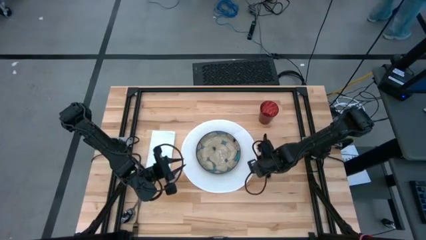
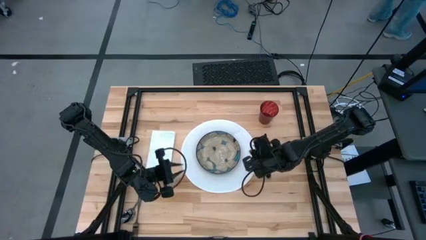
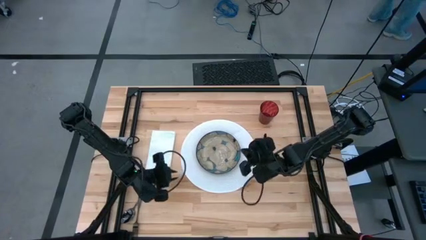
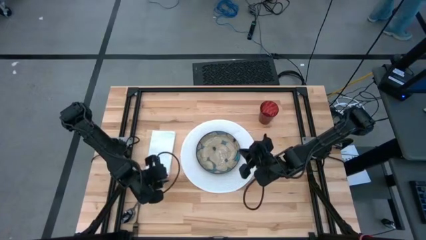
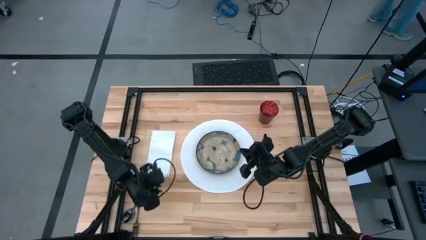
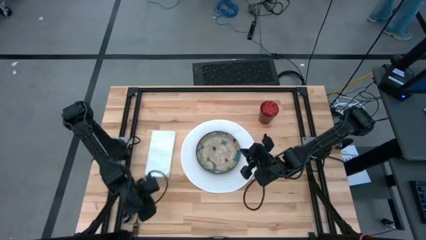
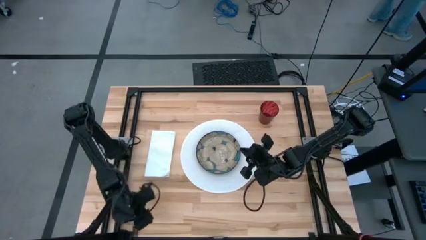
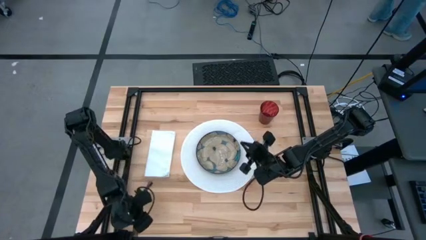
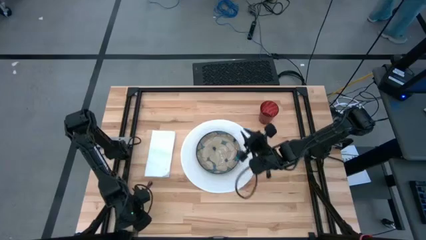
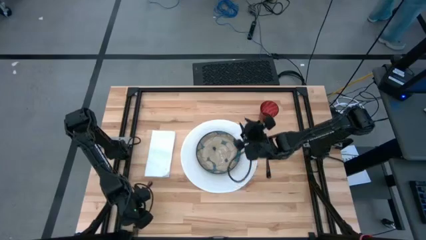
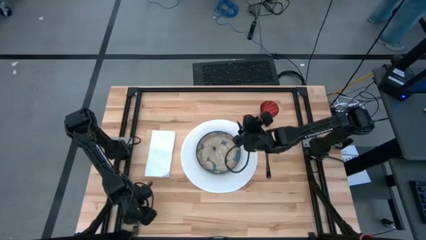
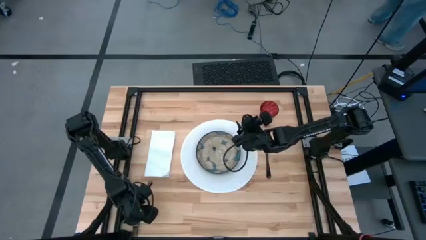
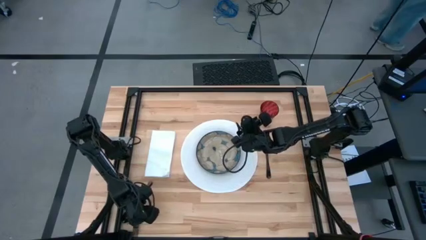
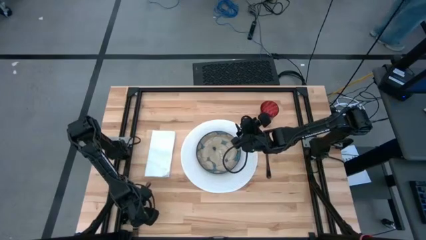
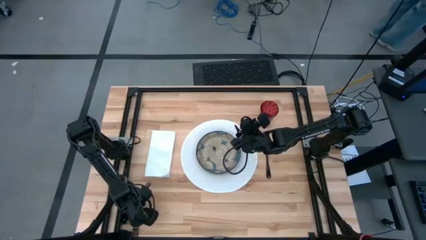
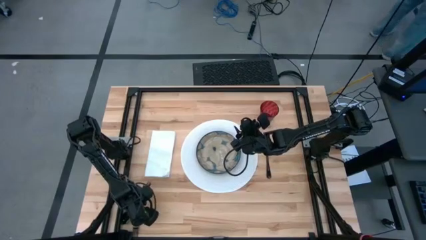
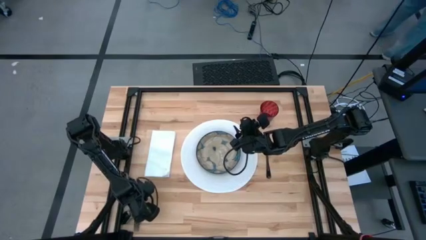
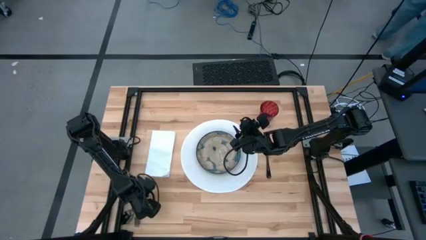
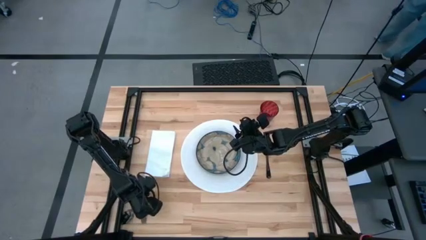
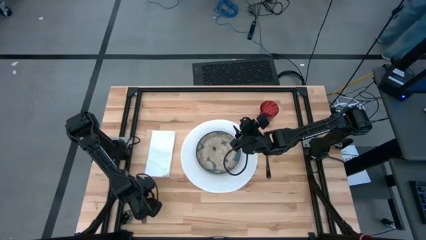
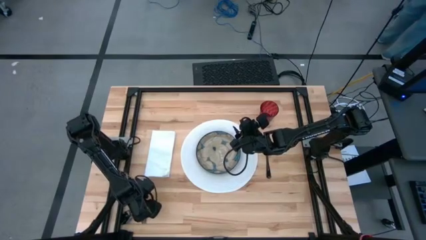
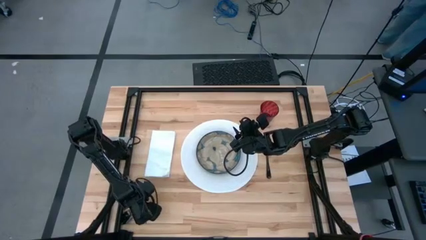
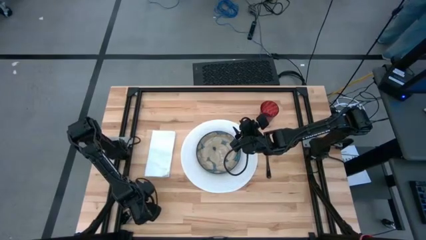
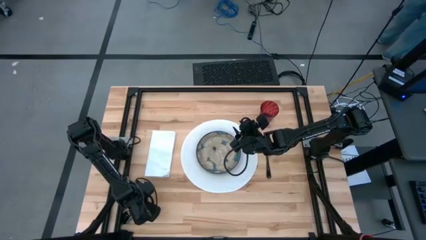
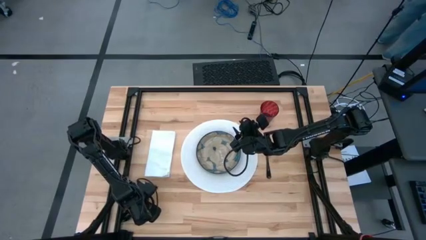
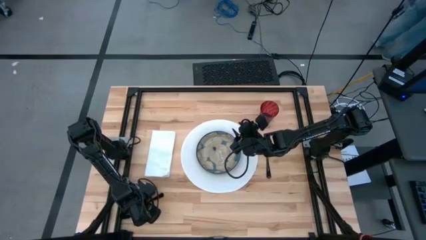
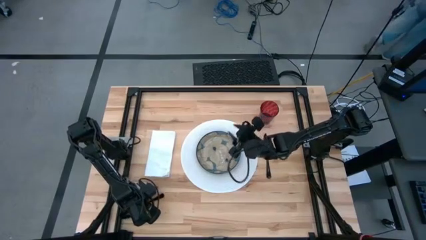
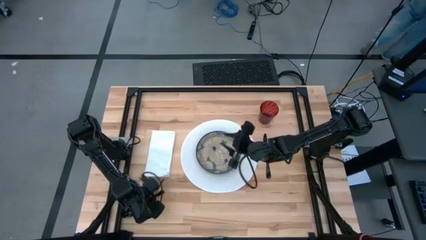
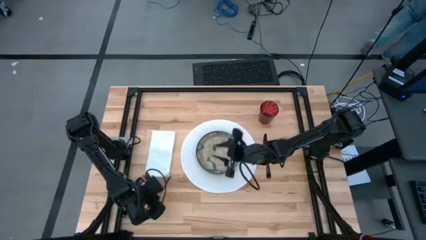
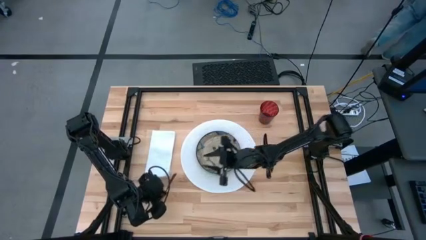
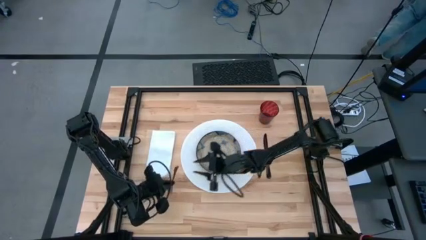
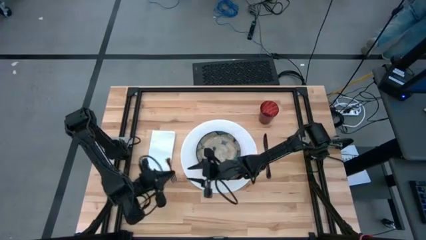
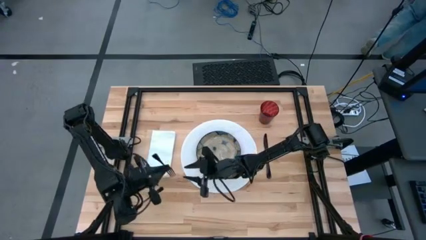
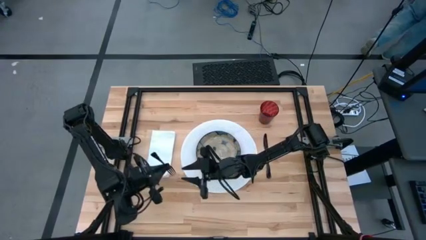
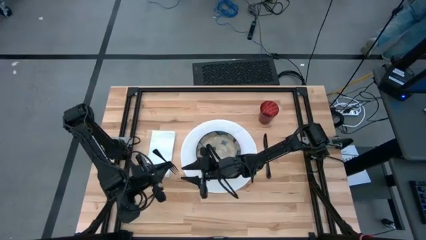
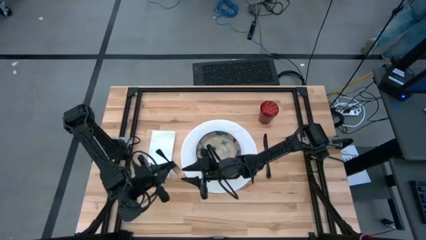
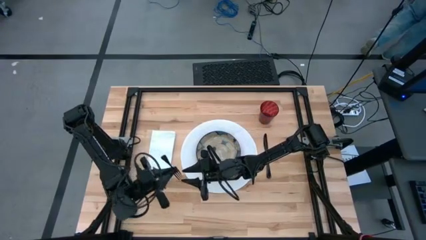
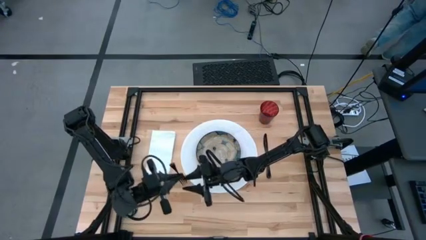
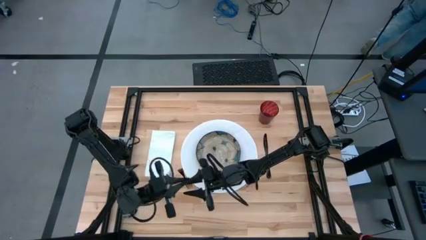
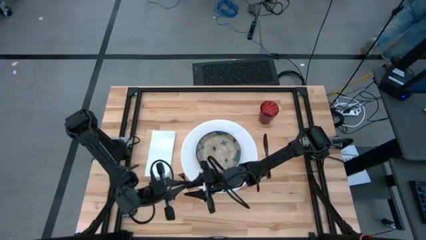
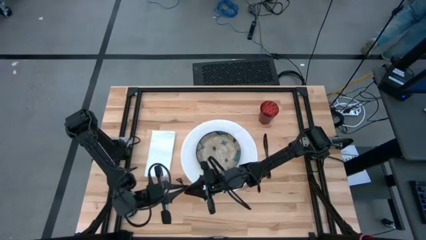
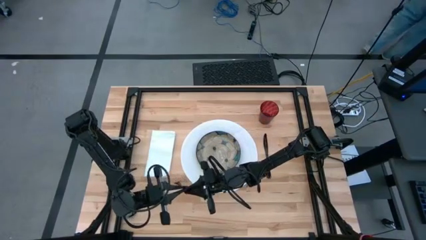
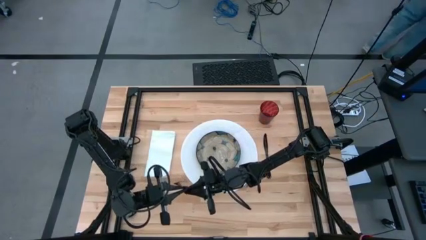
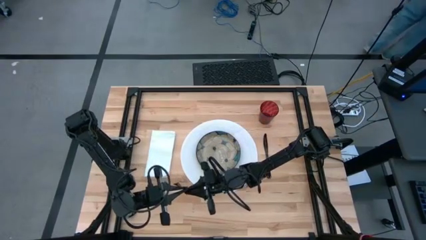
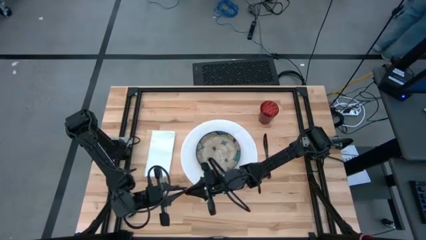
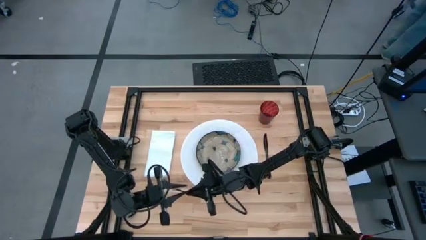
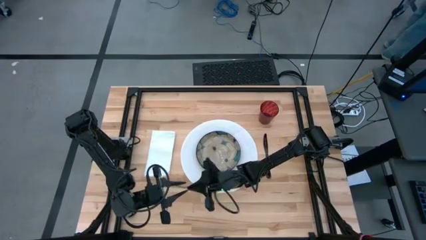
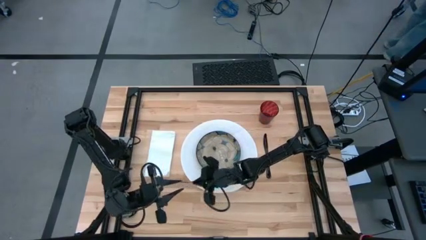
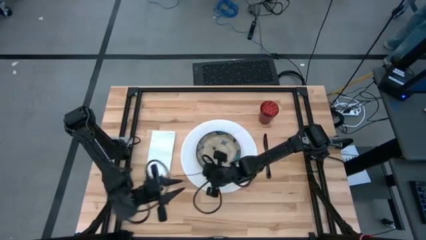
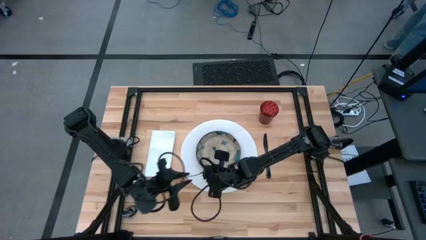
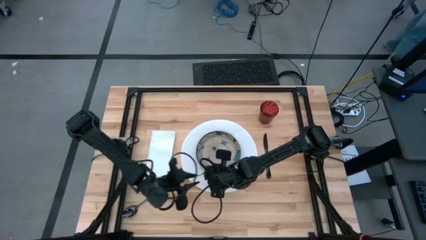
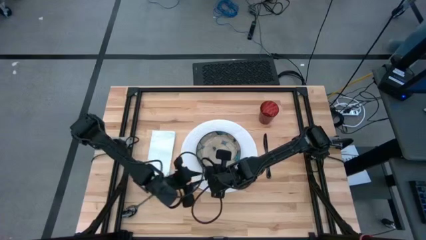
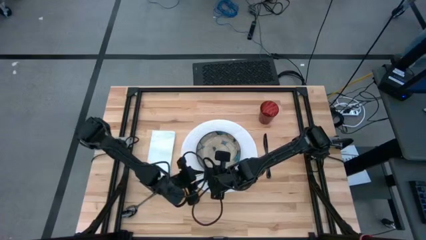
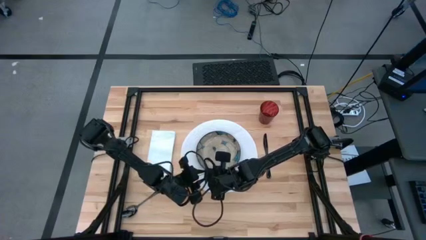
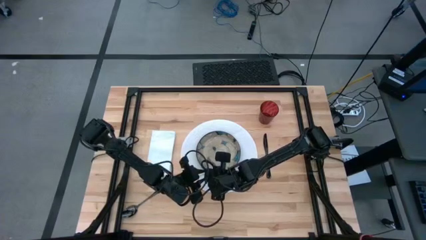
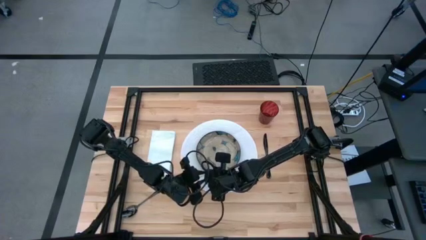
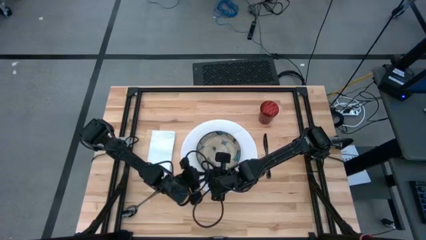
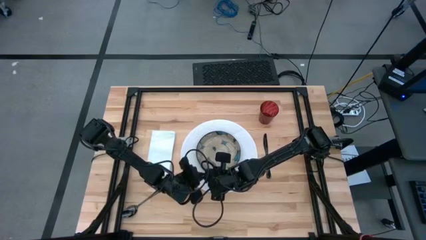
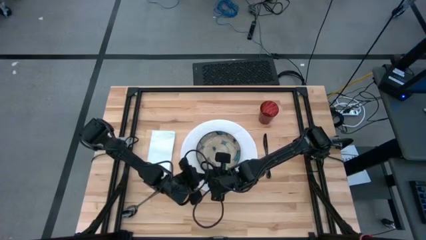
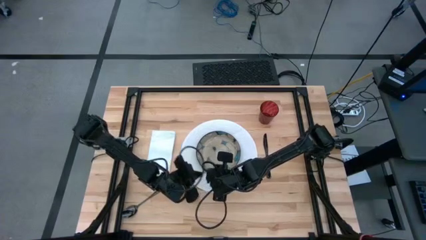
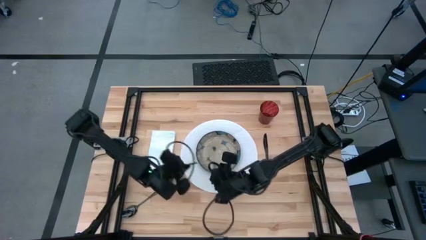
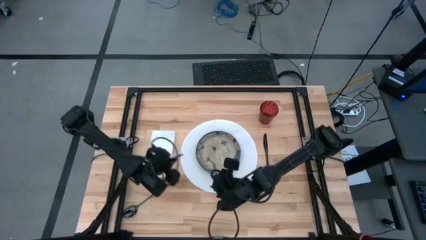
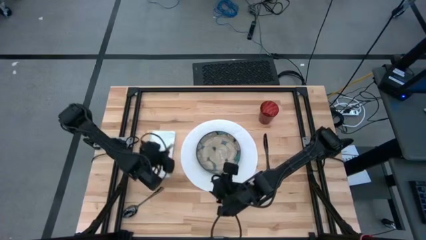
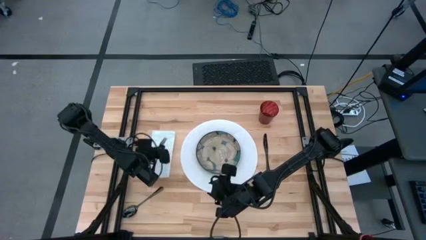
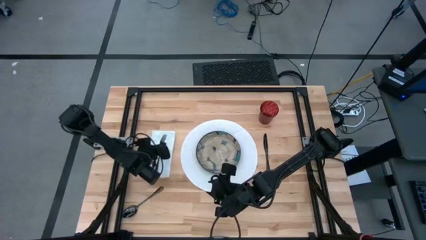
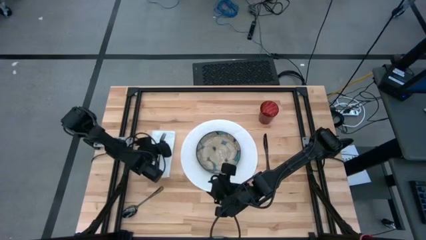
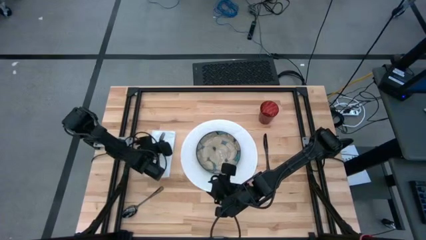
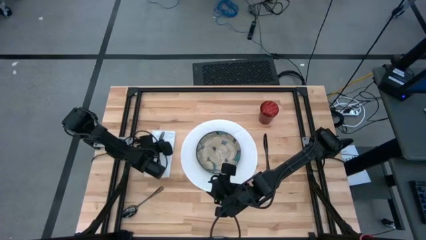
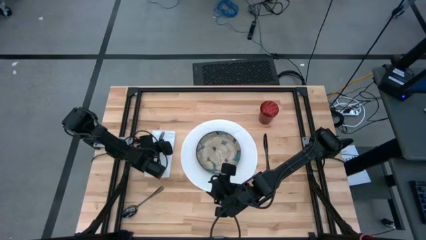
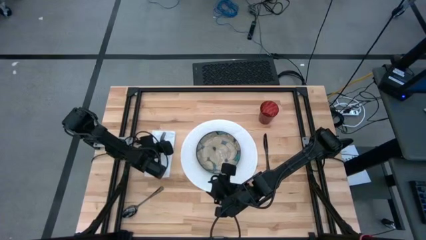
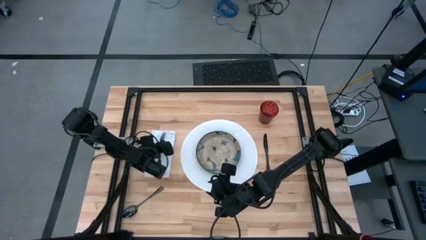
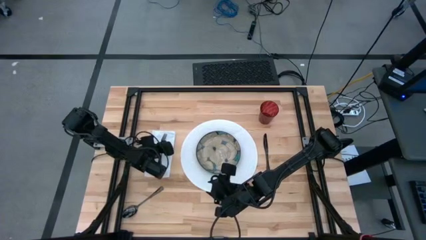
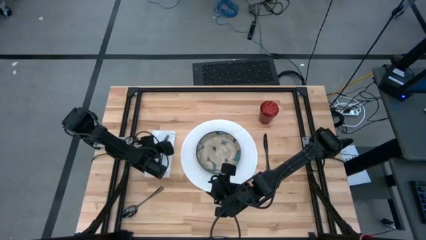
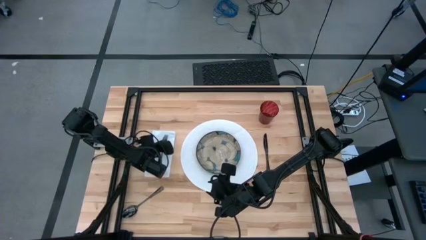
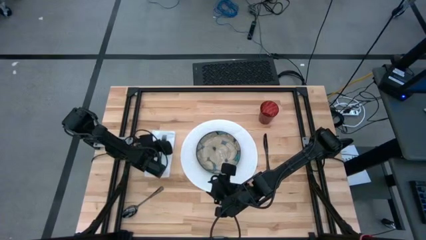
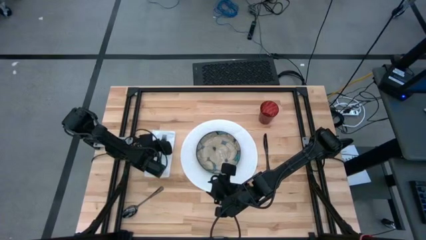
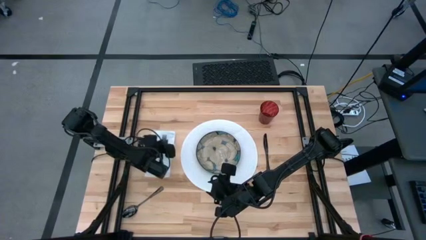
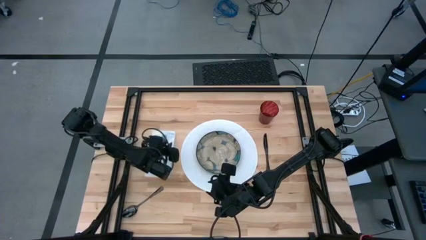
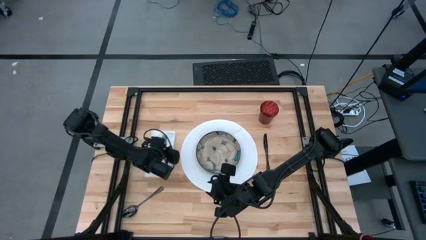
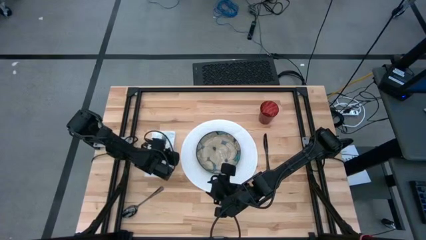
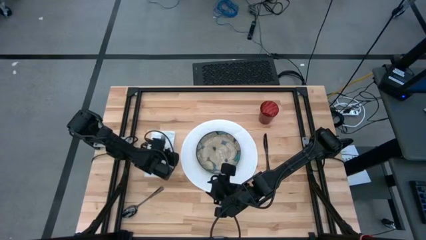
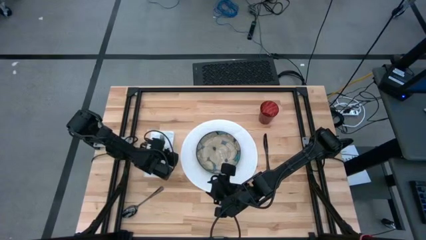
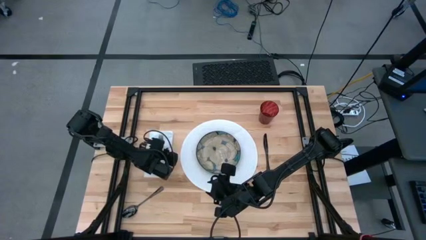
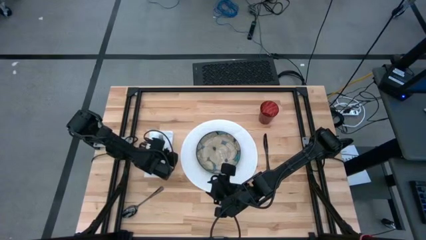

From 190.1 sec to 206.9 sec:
Task: Set table place
Put the black fork on the white napkin
